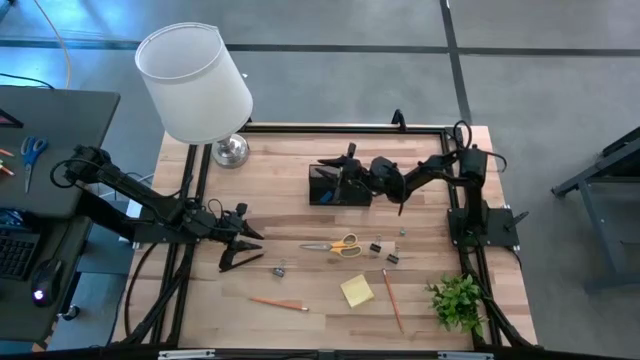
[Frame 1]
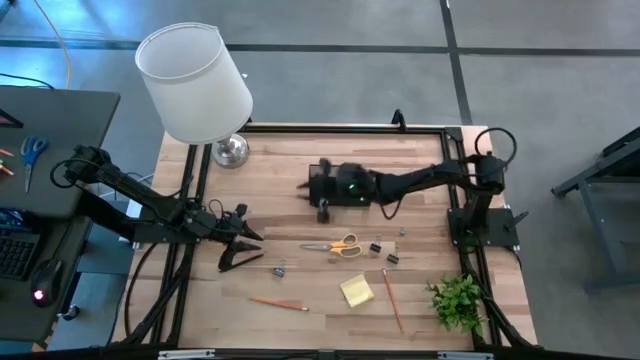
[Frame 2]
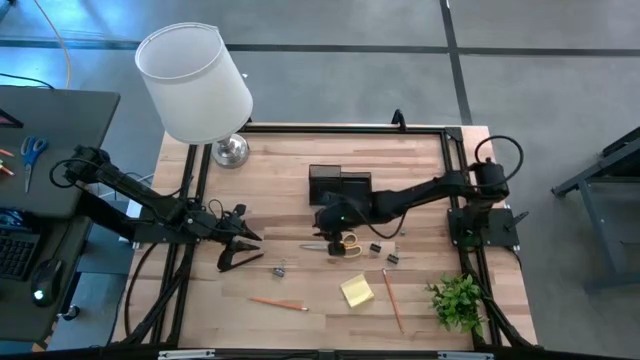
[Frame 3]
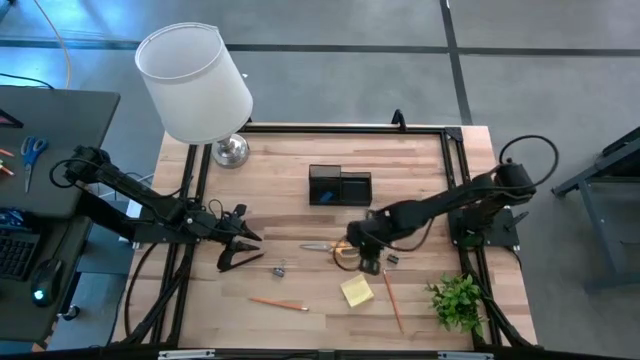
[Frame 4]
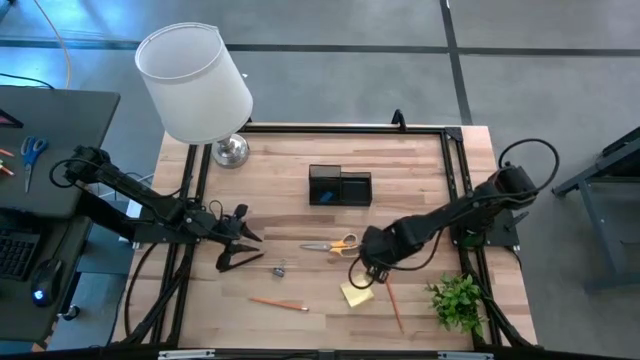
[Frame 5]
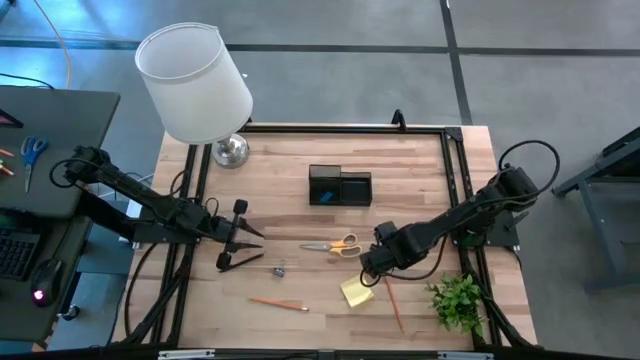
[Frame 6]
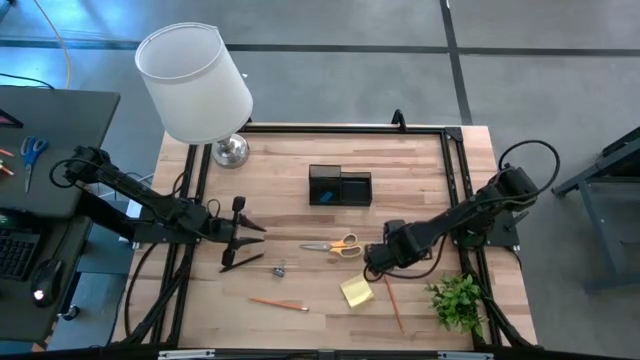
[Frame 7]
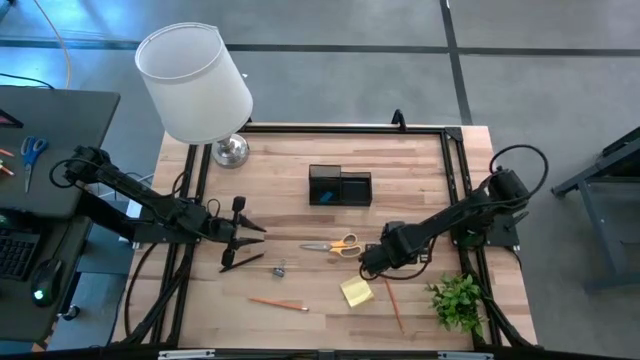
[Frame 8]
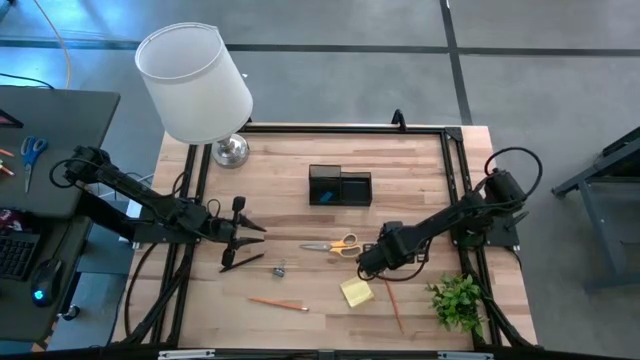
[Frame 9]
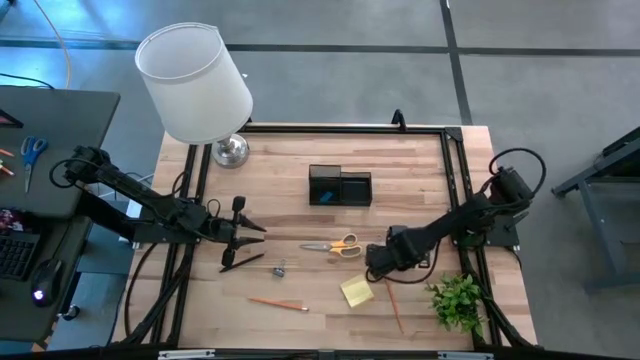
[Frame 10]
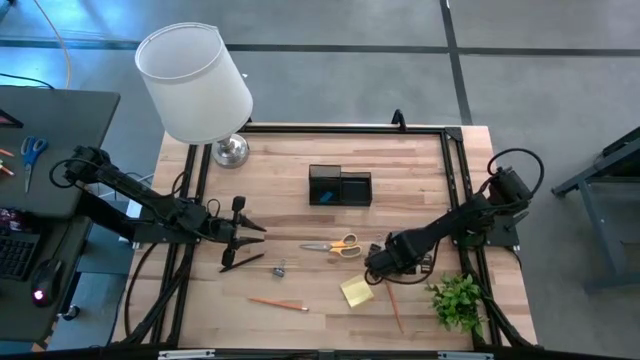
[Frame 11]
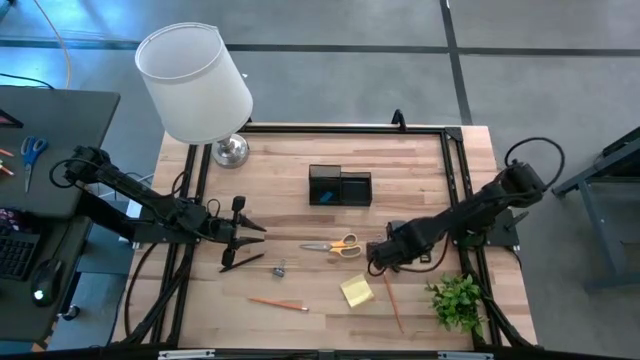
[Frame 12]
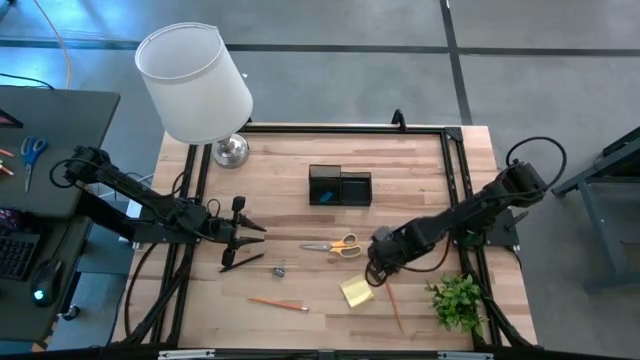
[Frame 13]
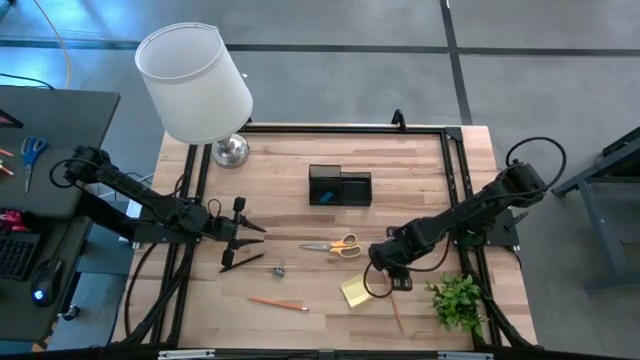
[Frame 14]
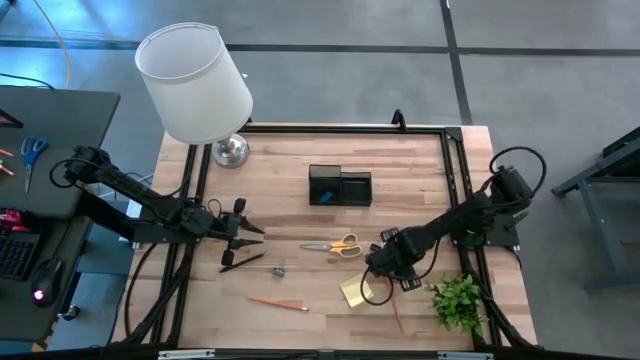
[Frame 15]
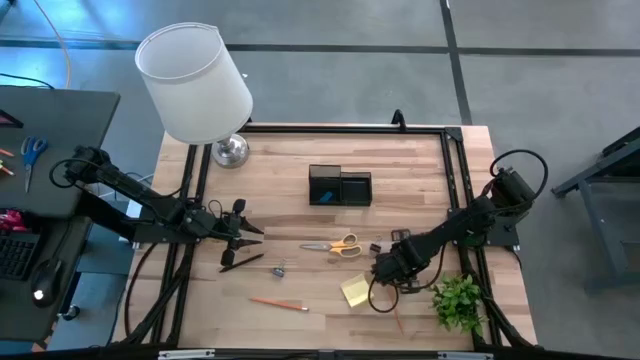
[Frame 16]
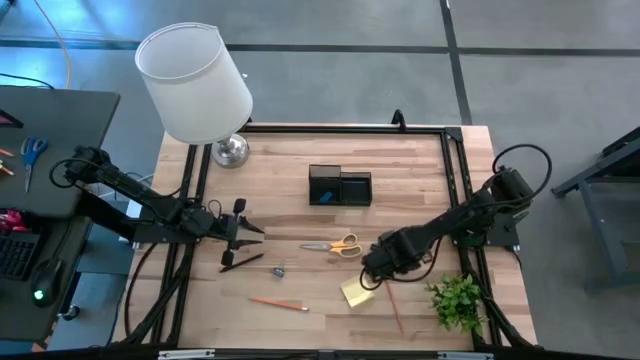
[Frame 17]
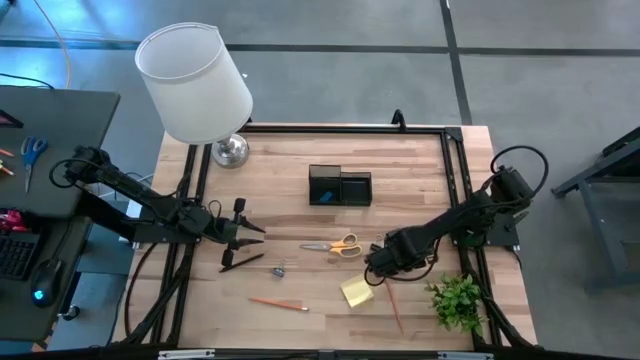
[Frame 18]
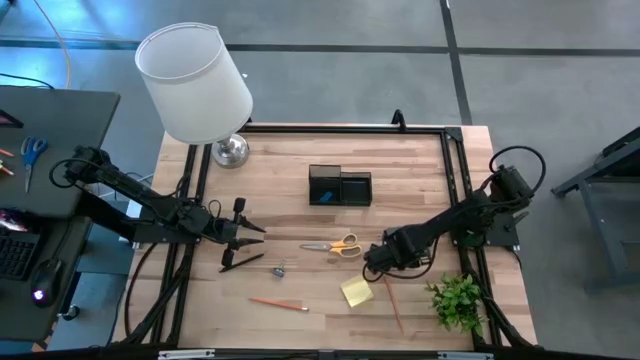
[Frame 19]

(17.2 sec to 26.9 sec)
Task: Pick and place office supplies into organizer
Put the bottom right black binder clip into the black desk organizer

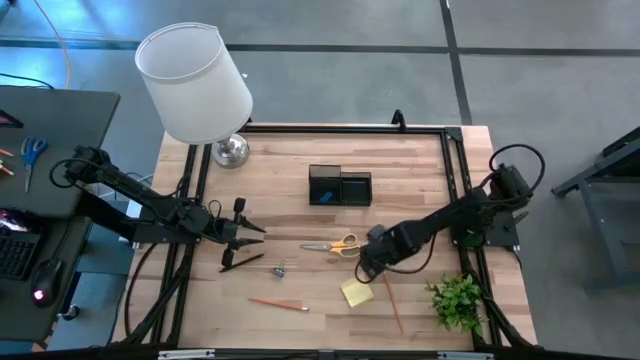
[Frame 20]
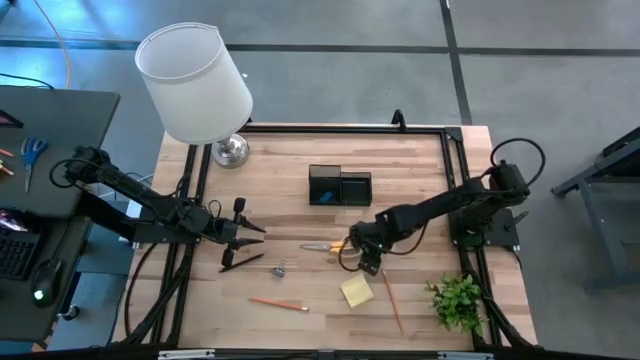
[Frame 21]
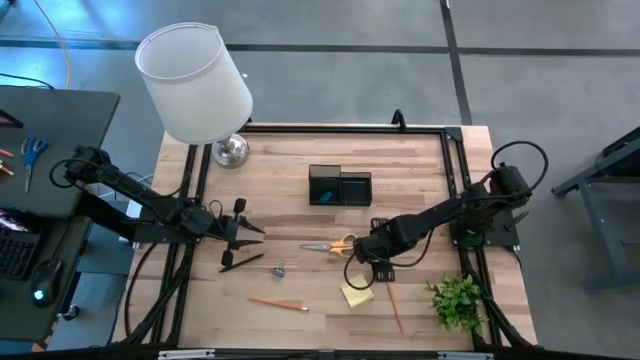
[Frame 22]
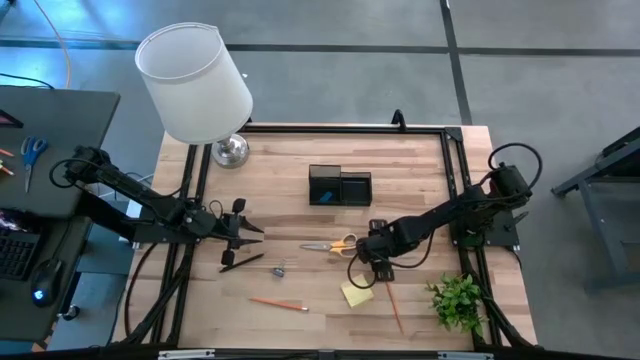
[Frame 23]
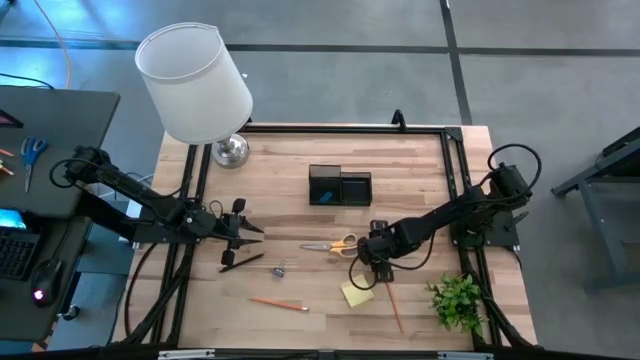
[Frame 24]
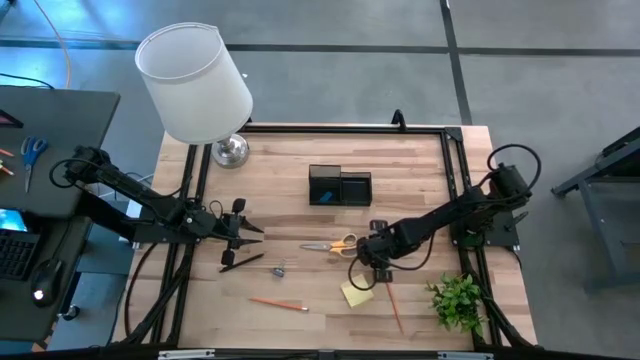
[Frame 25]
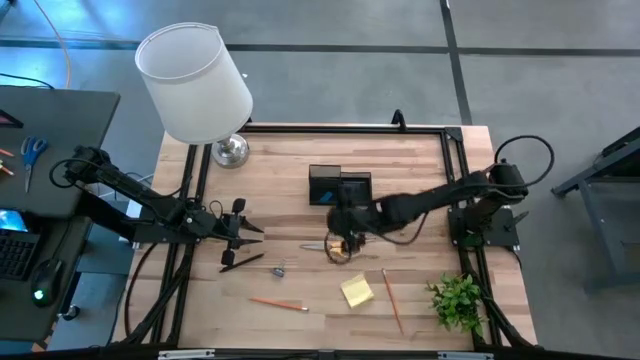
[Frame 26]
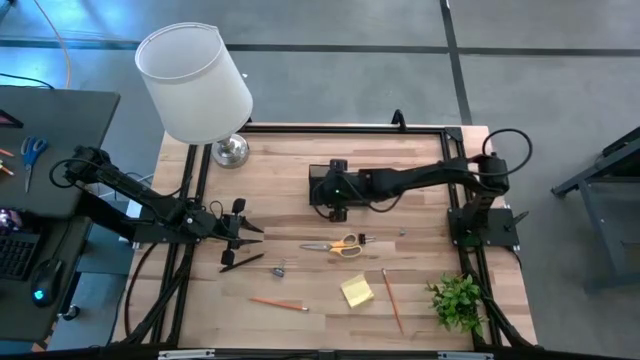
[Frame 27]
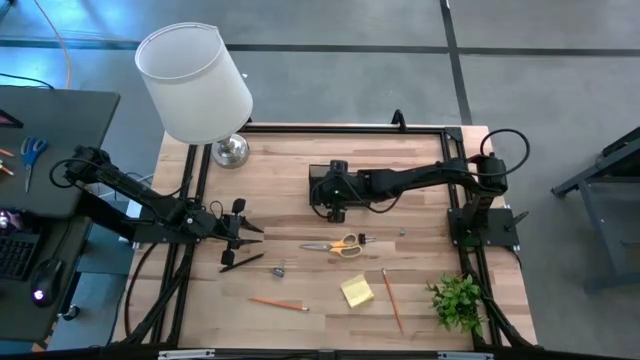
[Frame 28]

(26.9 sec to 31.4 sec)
Put the bottom right black binder clip into the black desk organizer

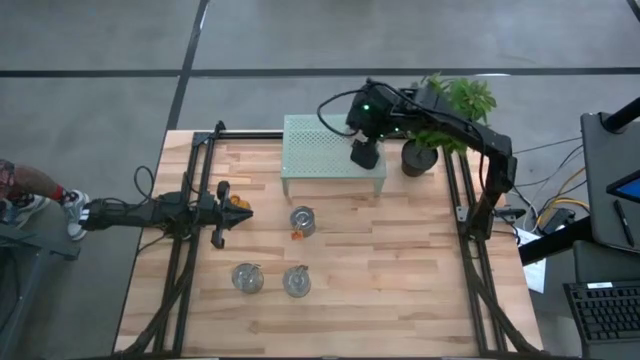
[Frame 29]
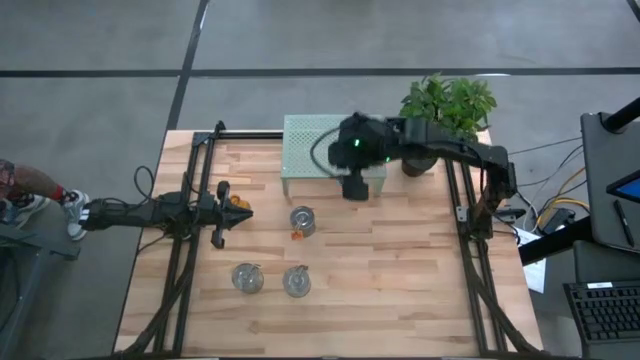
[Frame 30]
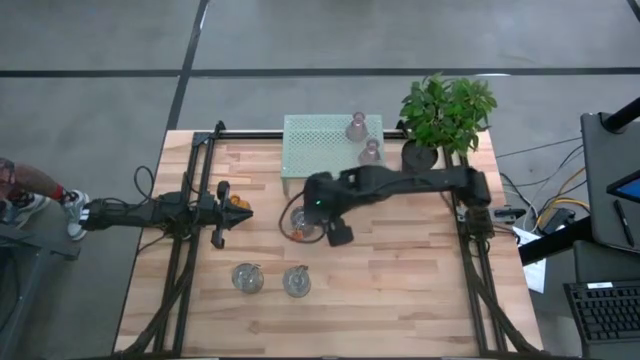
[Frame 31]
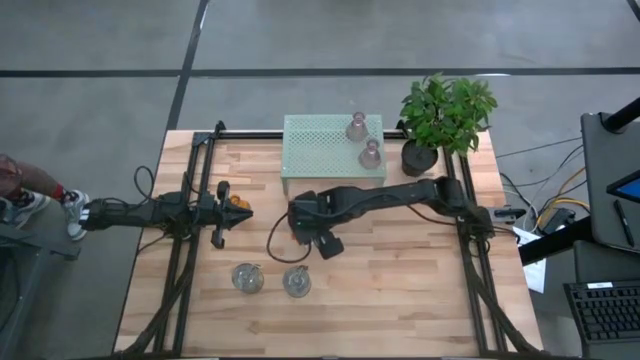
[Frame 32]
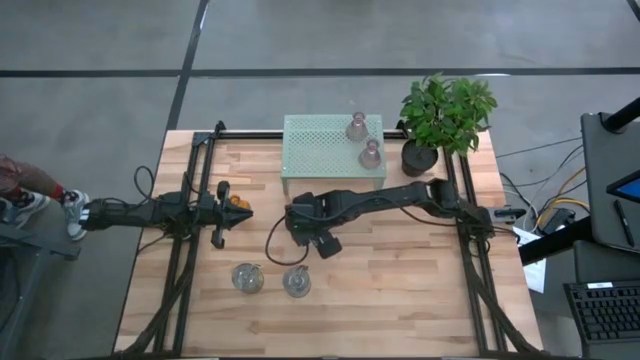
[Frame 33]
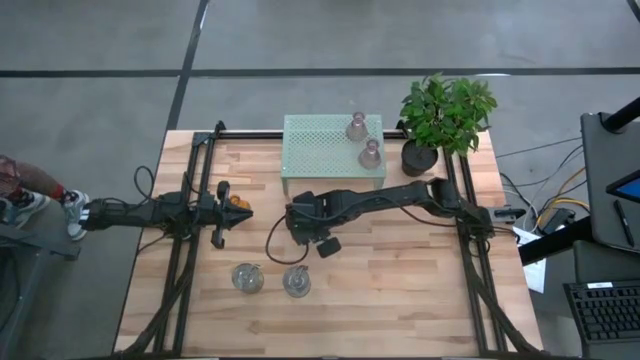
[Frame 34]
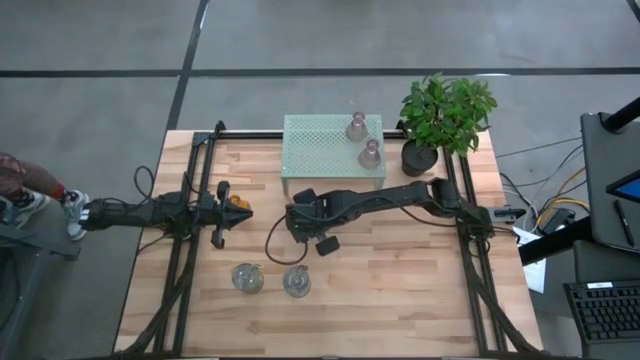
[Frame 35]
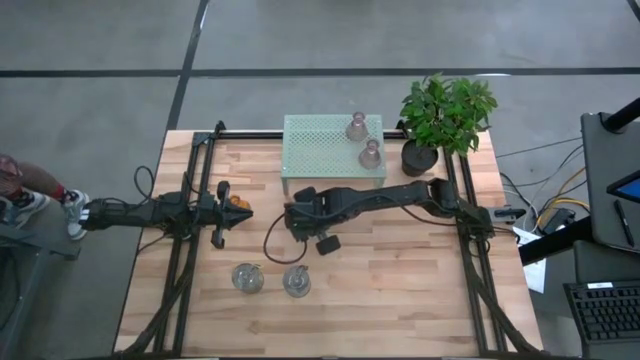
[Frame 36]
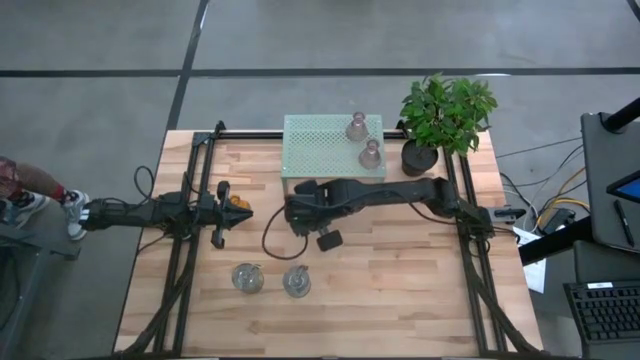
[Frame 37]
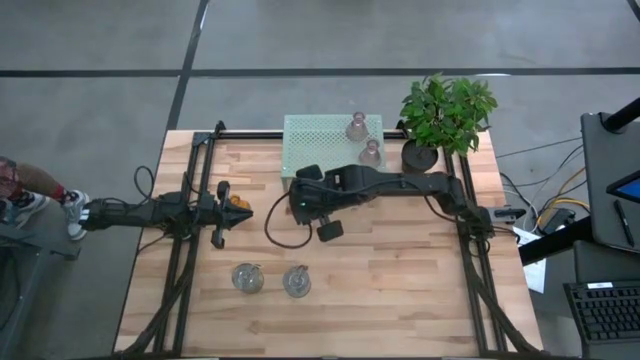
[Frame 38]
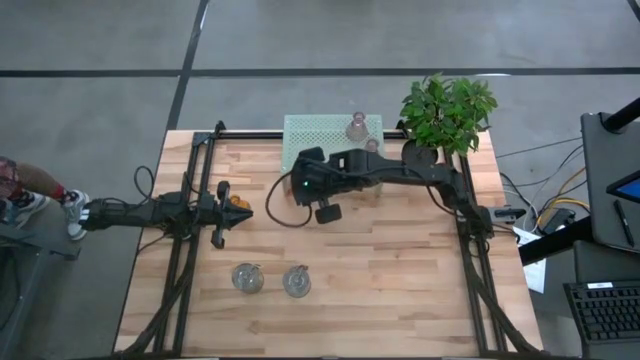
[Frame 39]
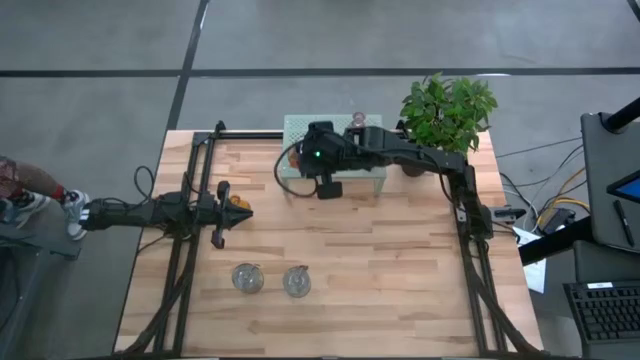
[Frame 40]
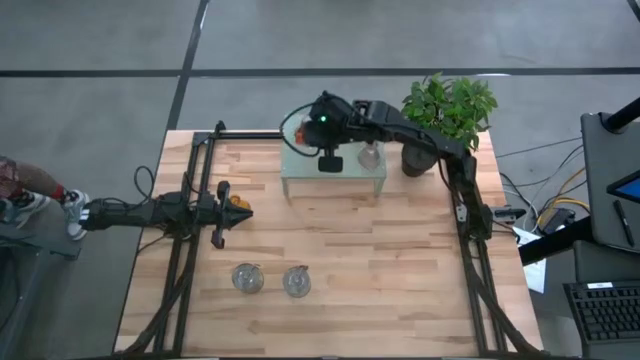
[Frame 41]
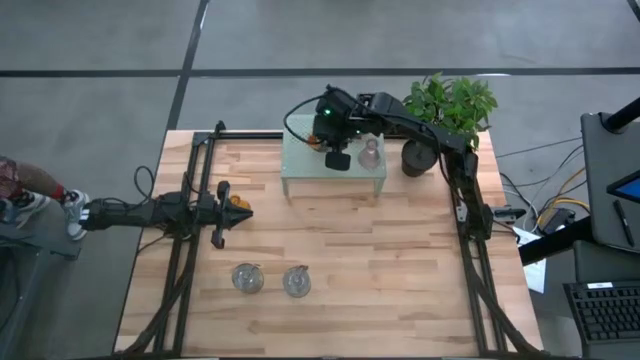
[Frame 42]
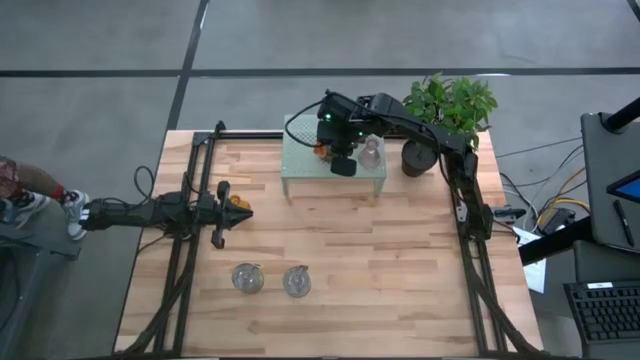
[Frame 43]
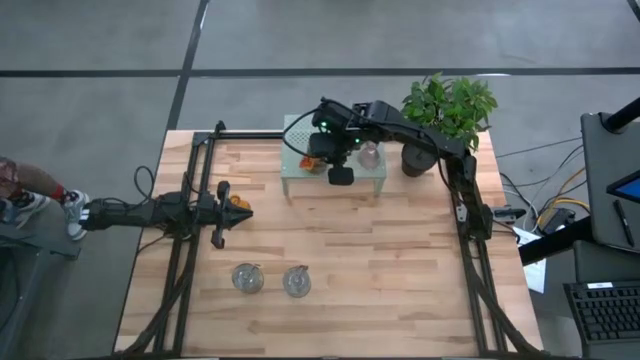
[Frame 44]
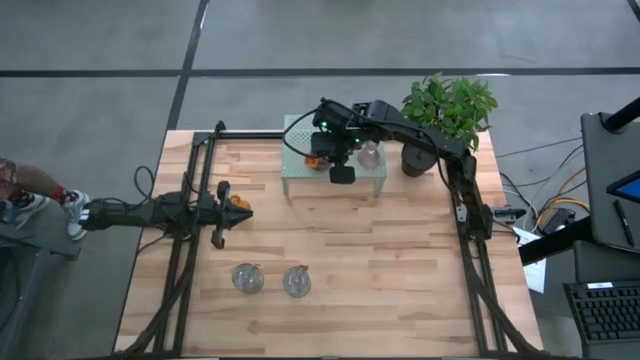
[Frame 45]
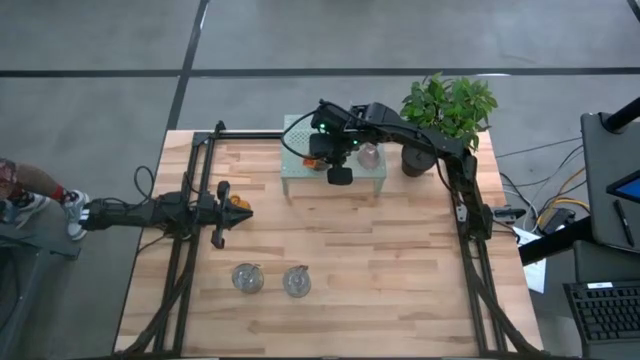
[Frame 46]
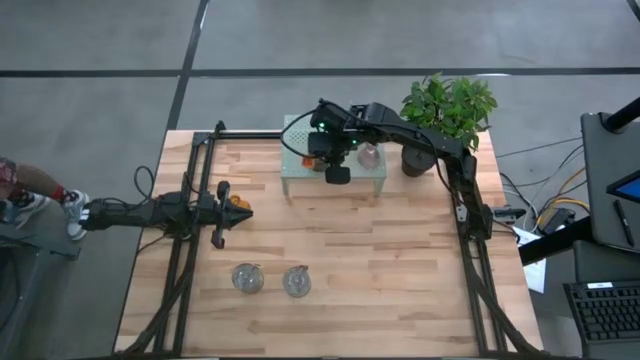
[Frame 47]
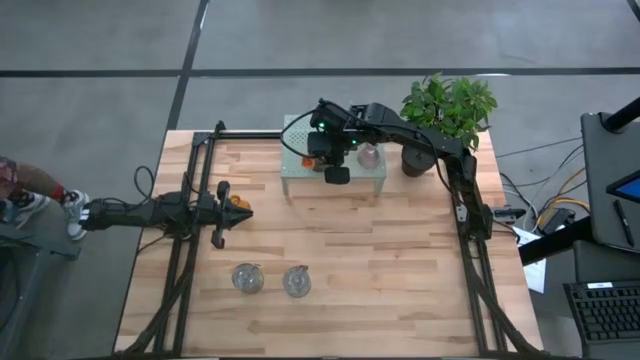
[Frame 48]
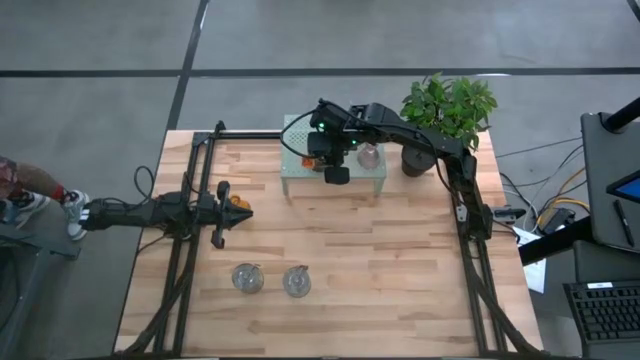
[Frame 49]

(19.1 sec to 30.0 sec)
Task: Pick & Place candle stick holders
Put the top scented candle can on the shelf
